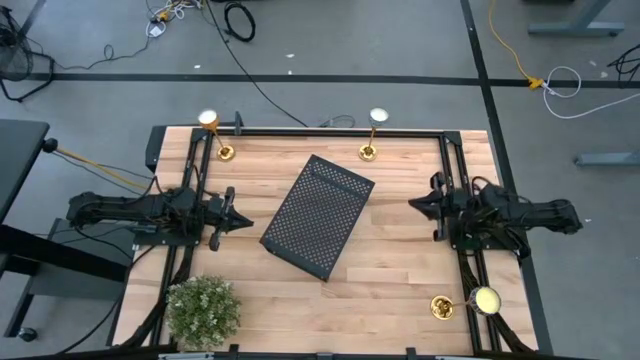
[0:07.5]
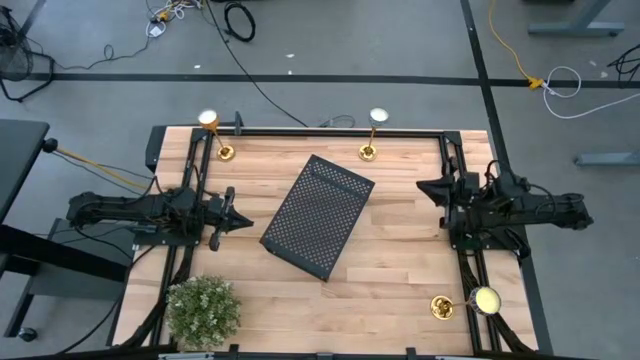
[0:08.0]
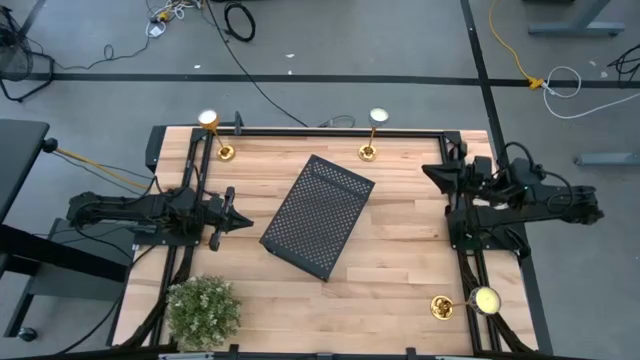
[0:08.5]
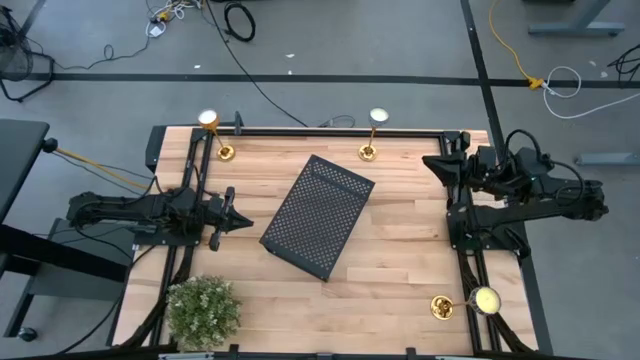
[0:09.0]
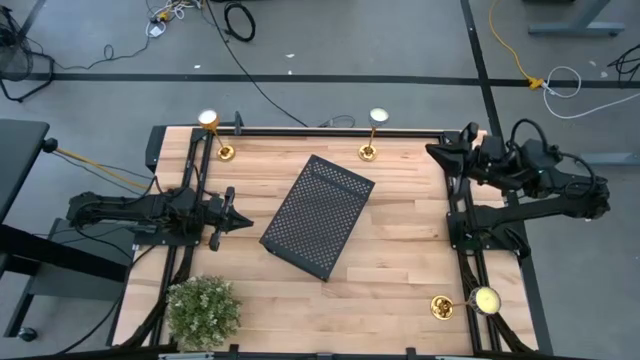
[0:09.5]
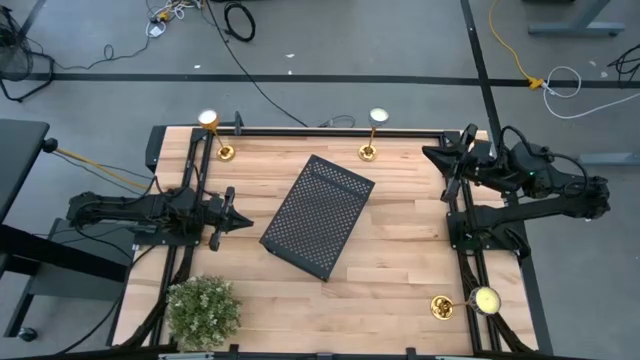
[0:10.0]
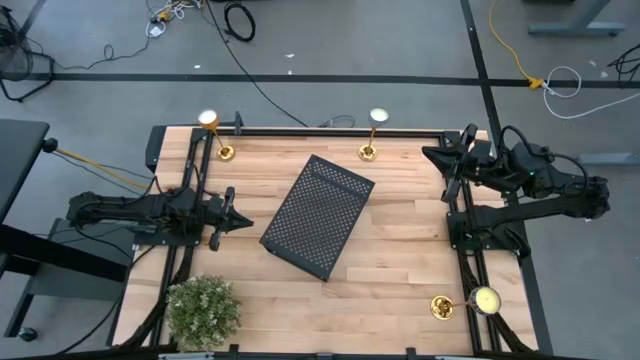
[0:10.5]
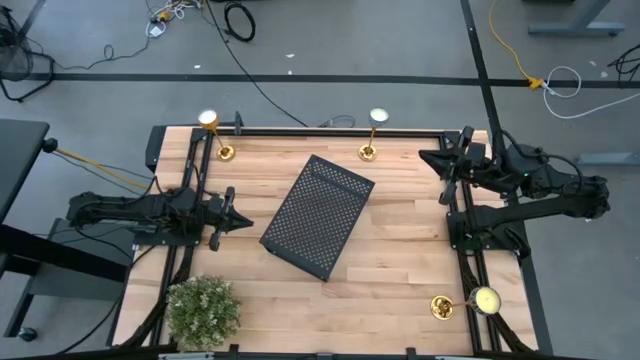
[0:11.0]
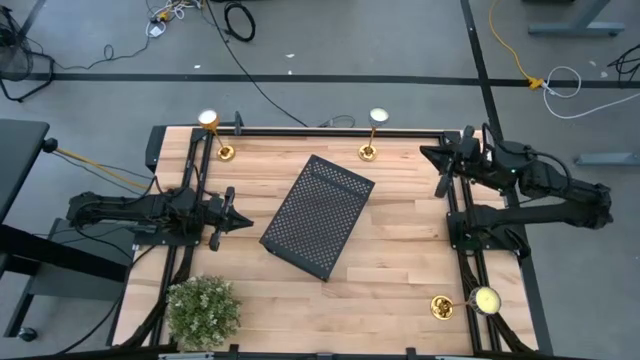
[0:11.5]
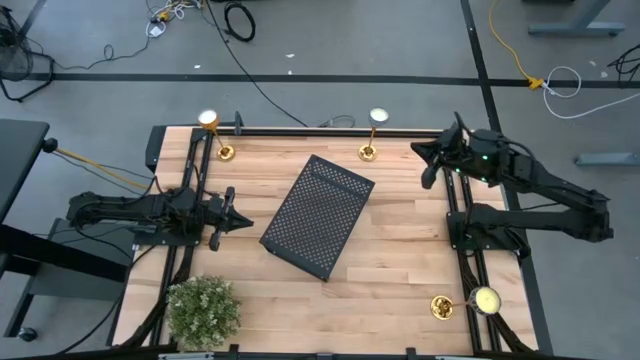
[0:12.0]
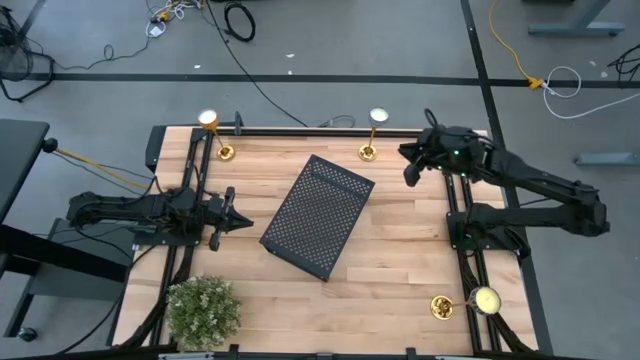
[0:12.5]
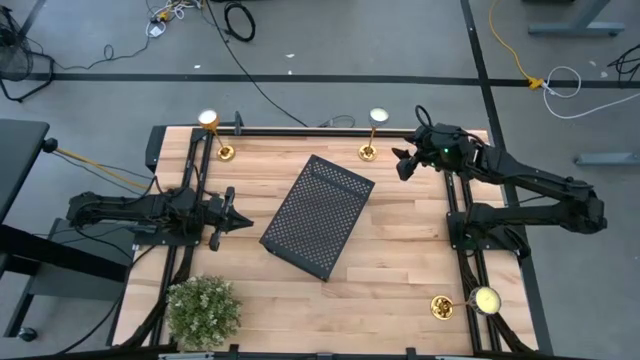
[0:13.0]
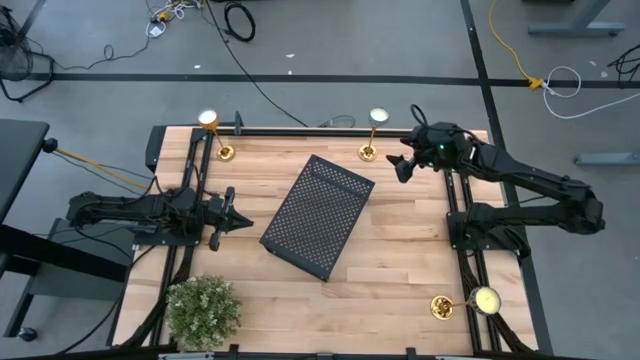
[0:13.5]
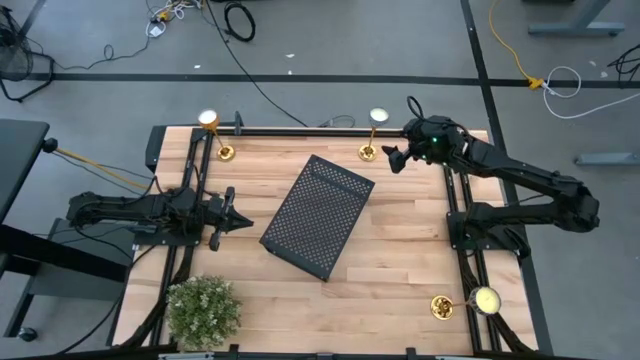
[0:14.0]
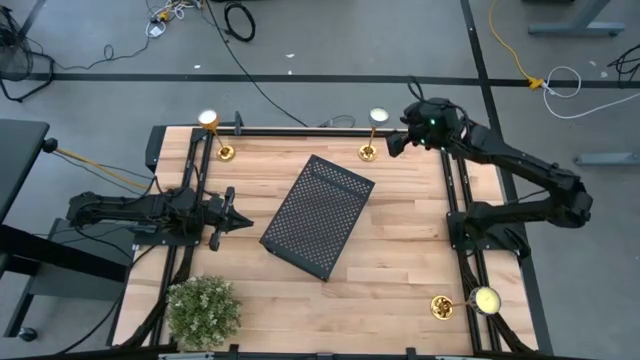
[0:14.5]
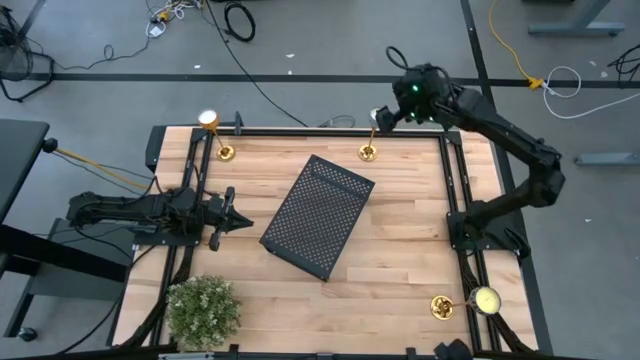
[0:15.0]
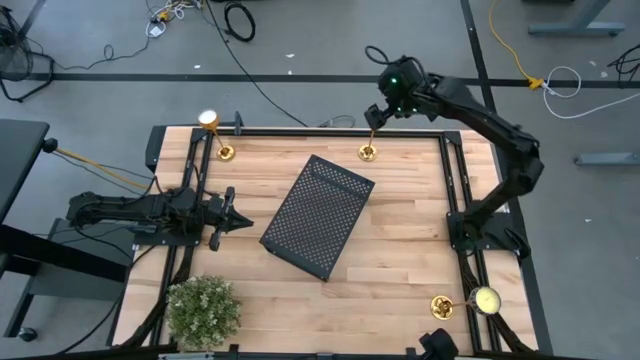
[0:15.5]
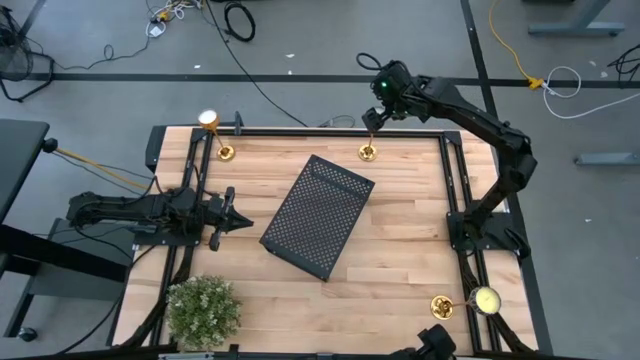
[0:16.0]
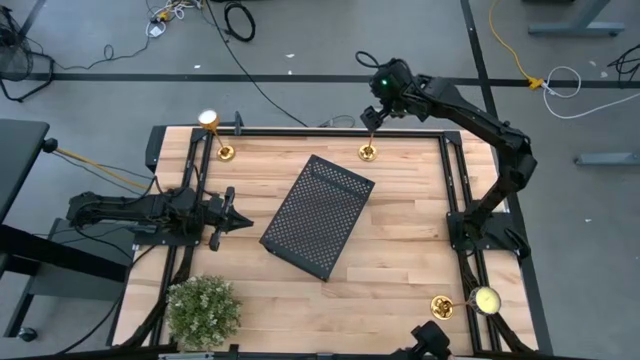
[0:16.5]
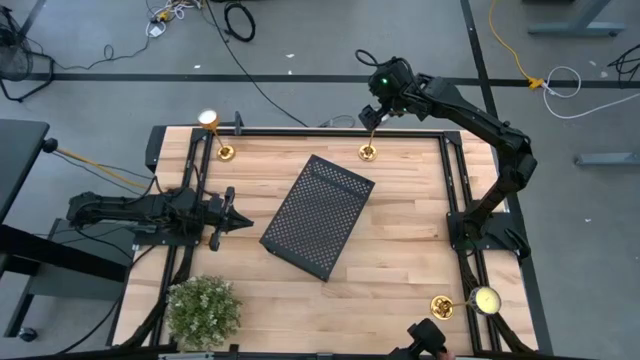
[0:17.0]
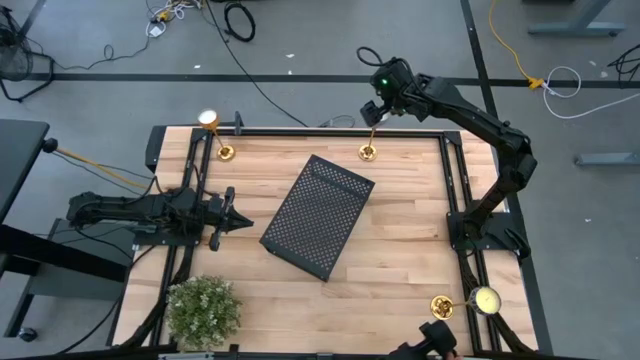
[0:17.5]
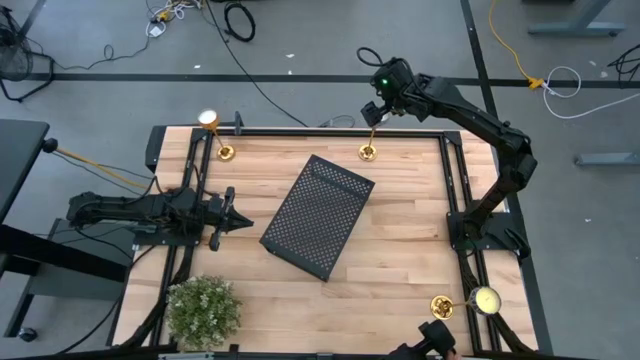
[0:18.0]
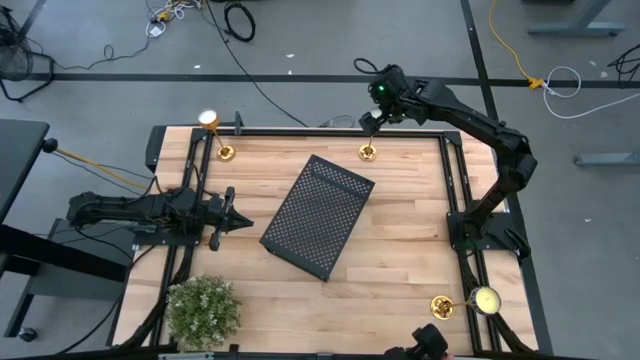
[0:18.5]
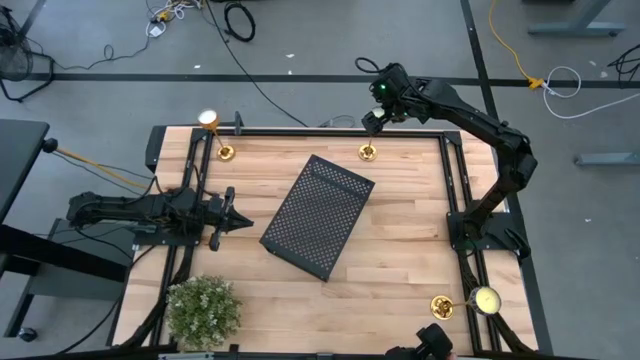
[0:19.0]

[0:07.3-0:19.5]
Task: Stock candles on shelf
Put the blue scented candle on the shelf

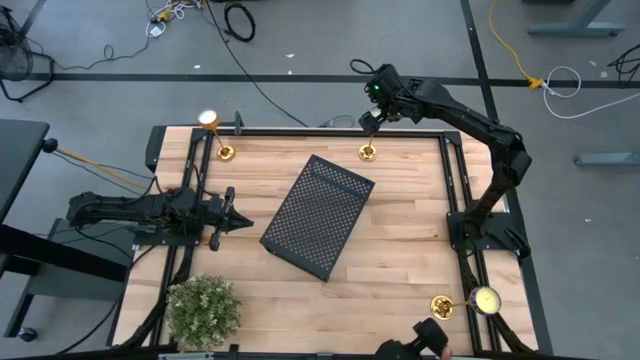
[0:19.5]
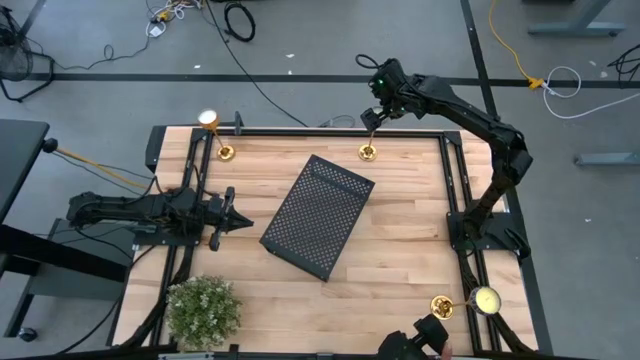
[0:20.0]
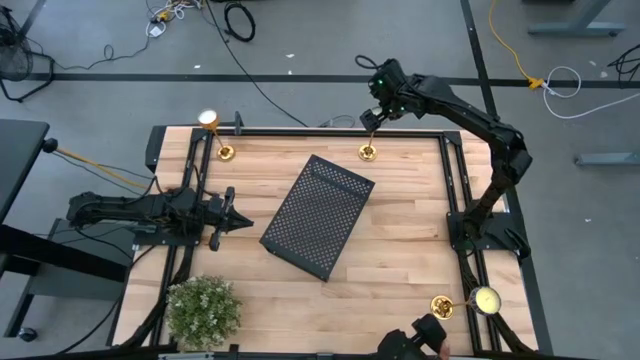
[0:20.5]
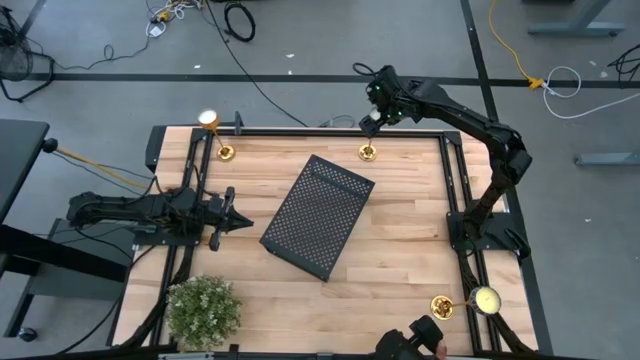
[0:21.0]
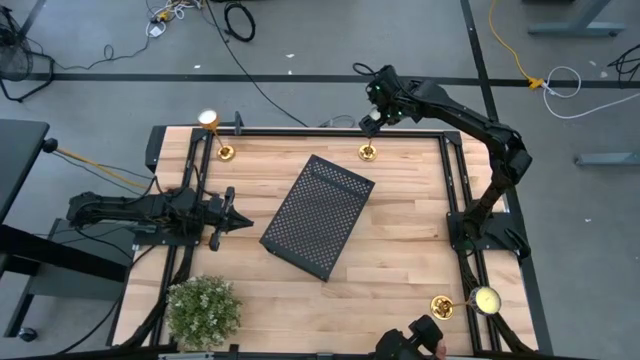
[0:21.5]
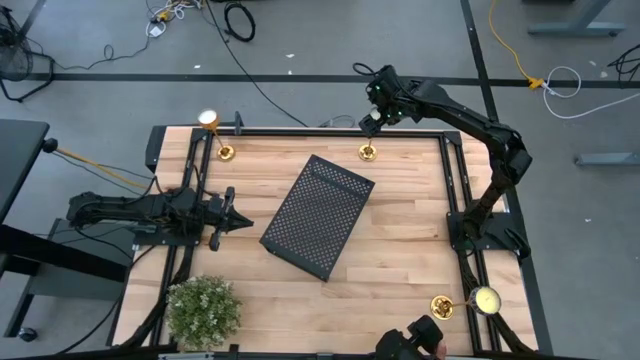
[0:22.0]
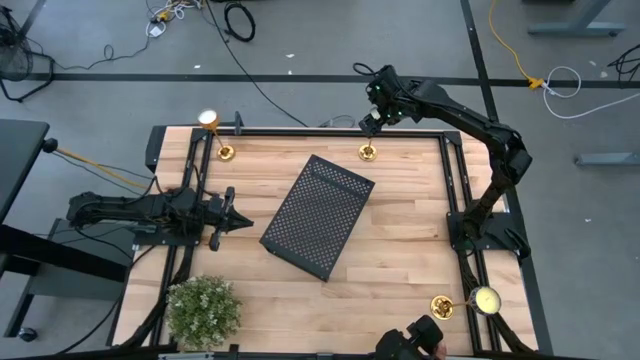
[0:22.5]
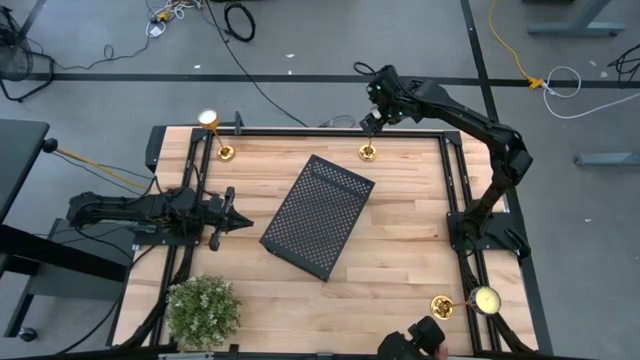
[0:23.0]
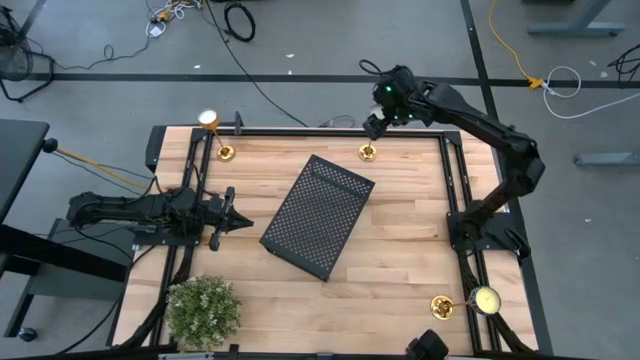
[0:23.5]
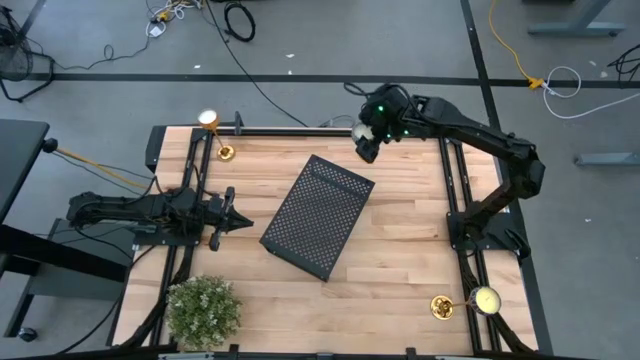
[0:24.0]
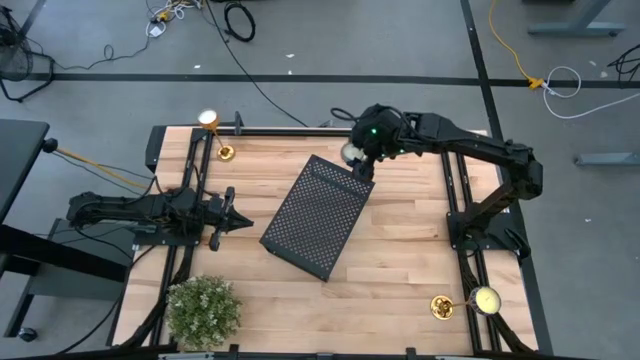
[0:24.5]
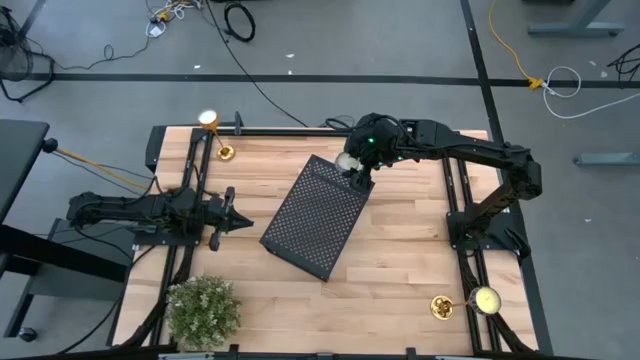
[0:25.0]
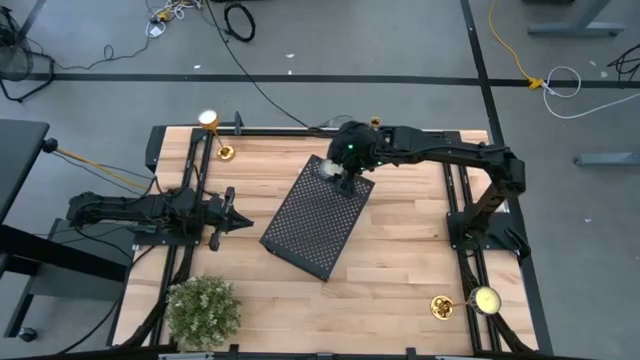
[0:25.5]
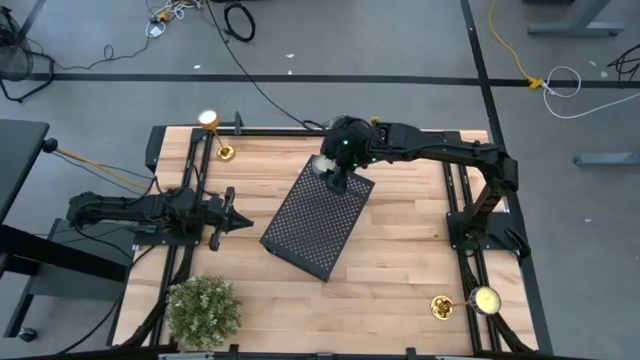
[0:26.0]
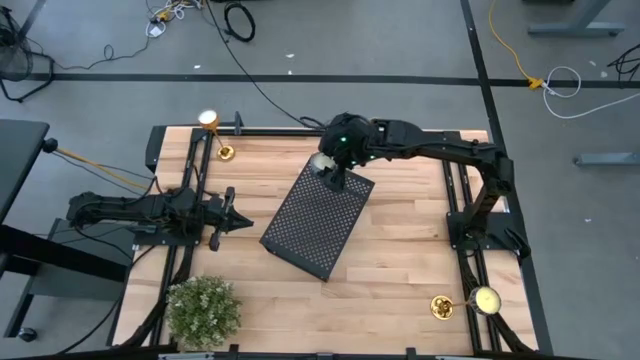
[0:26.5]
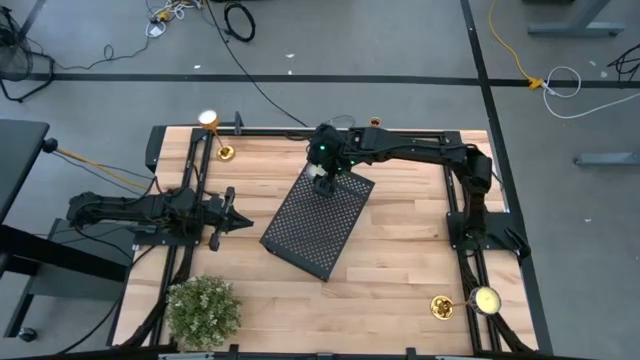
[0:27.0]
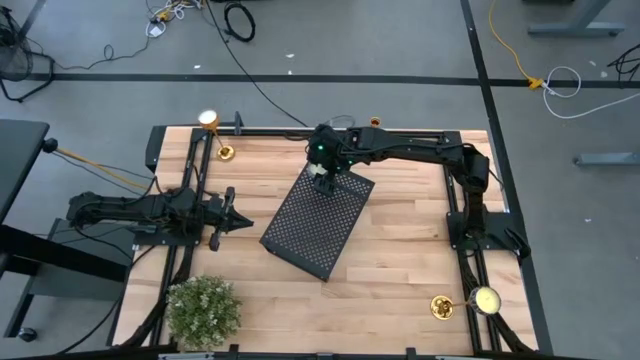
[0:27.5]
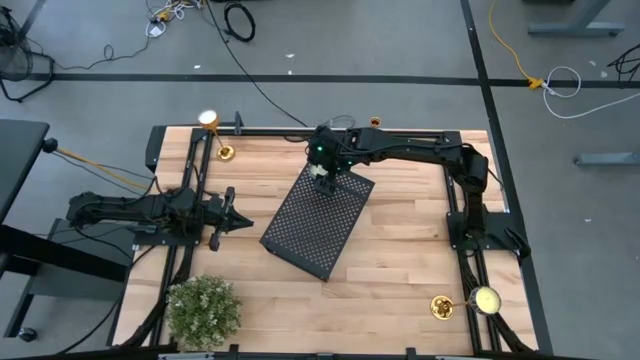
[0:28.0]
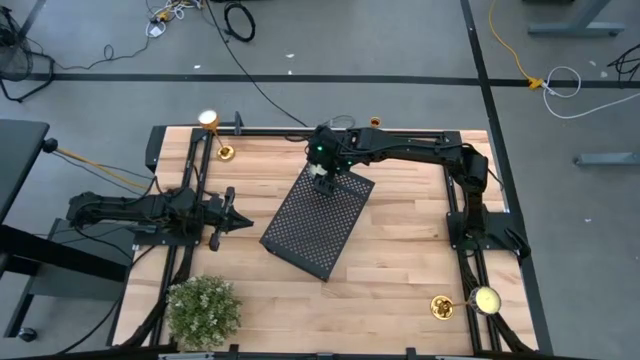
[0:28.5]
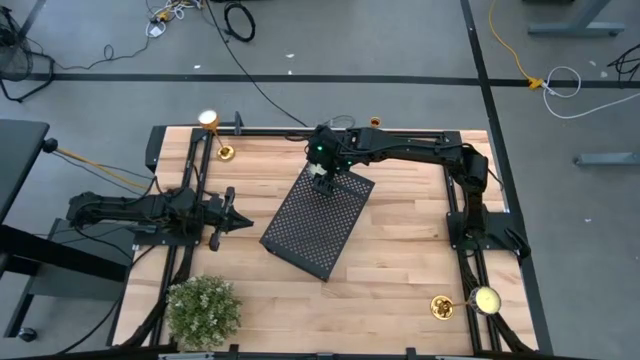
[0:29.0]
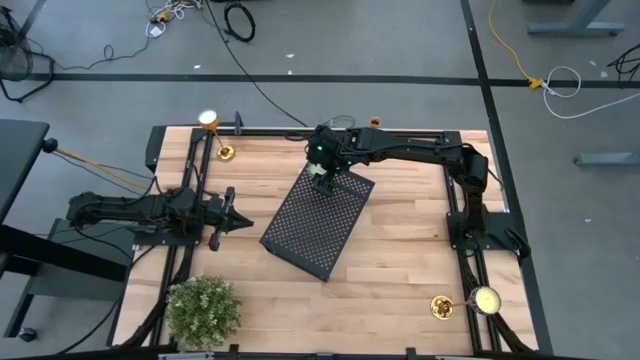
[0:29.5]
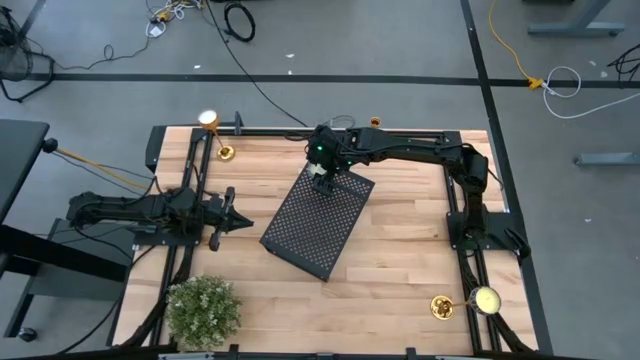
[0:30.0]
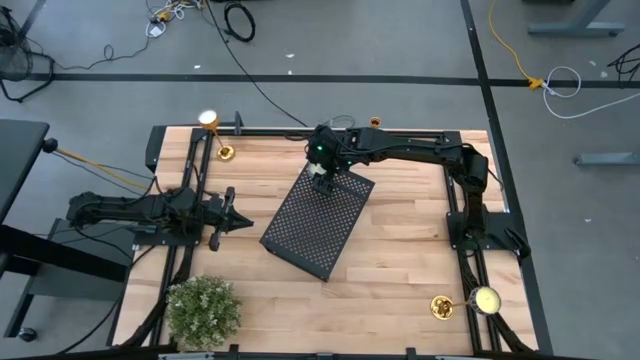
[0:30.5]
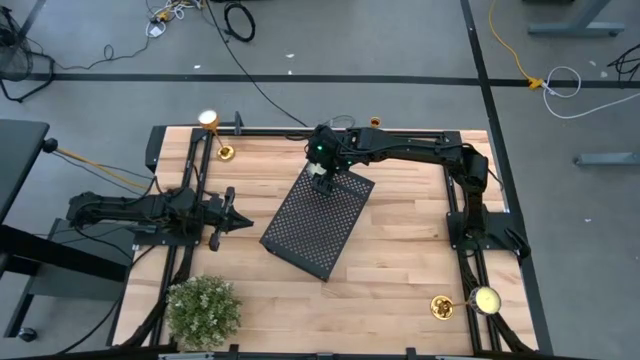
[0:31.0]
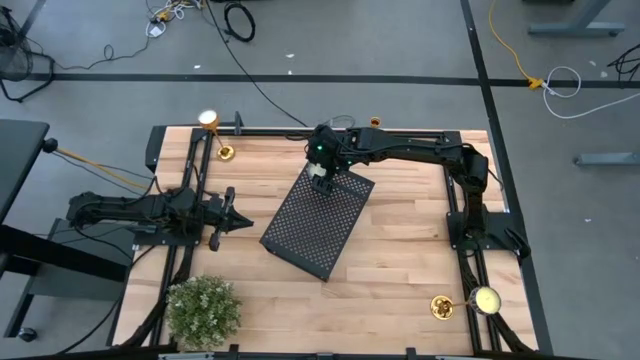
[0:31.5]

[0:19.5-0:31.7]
Put the blue scented candle on the shelf
